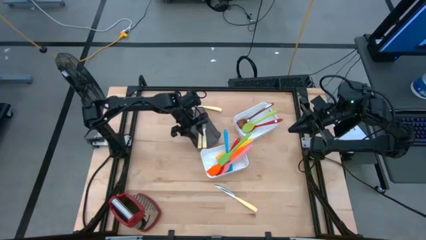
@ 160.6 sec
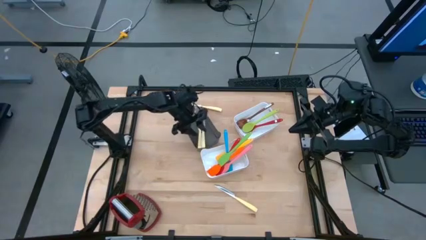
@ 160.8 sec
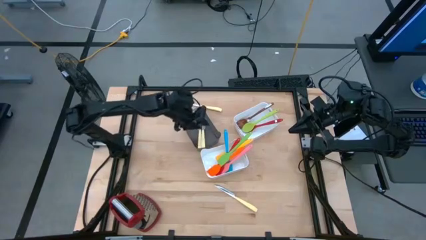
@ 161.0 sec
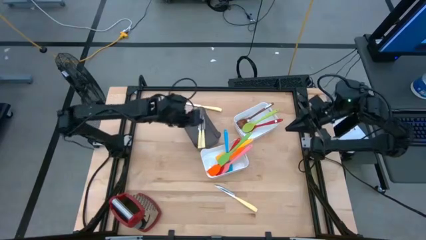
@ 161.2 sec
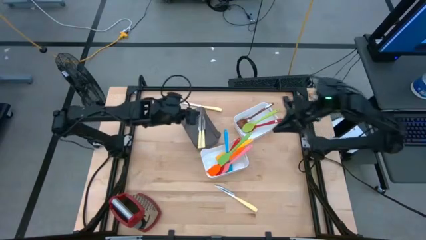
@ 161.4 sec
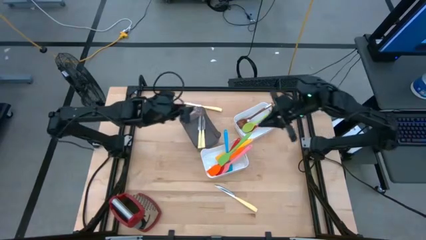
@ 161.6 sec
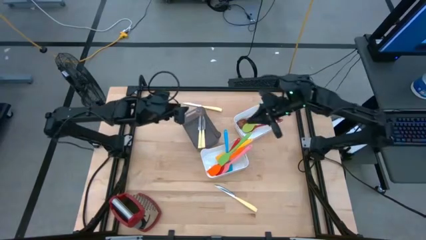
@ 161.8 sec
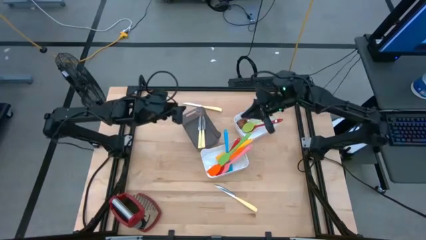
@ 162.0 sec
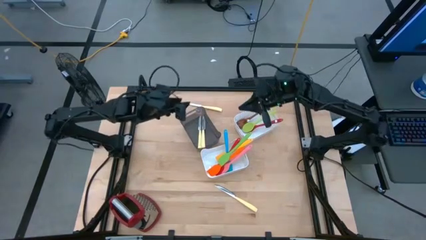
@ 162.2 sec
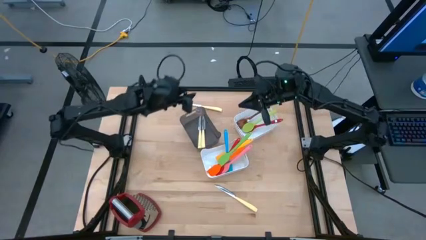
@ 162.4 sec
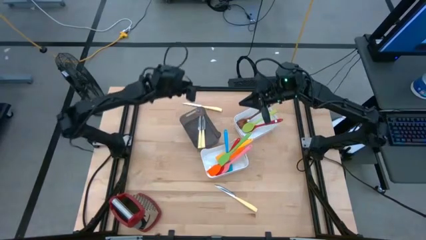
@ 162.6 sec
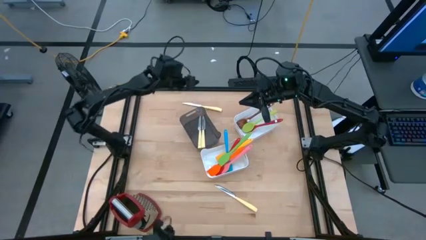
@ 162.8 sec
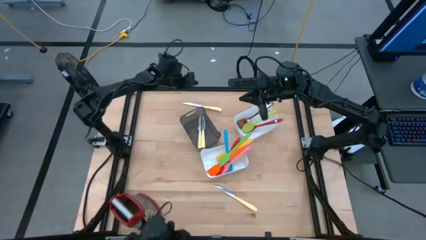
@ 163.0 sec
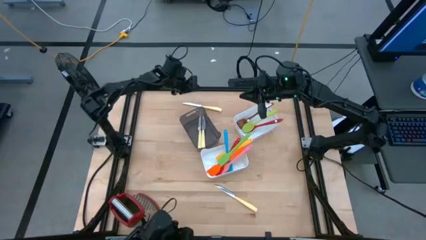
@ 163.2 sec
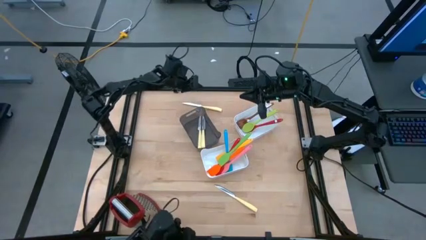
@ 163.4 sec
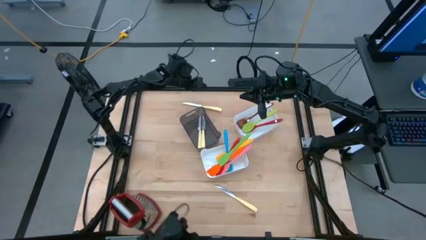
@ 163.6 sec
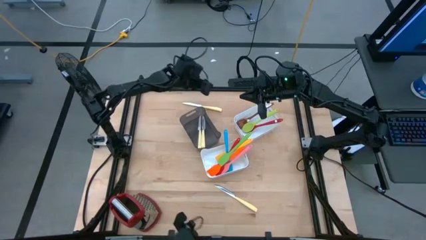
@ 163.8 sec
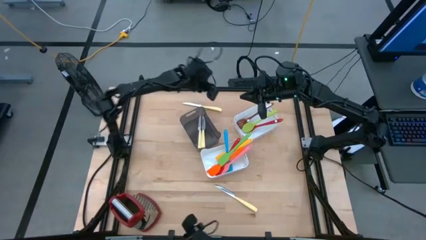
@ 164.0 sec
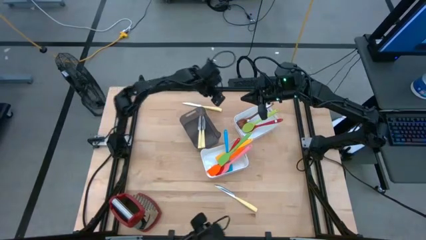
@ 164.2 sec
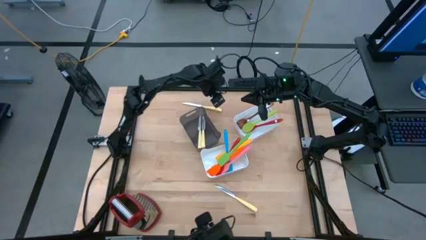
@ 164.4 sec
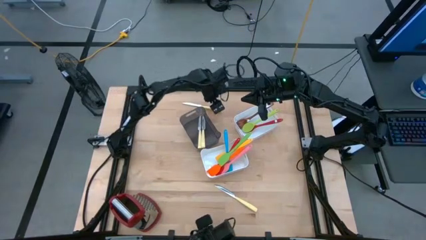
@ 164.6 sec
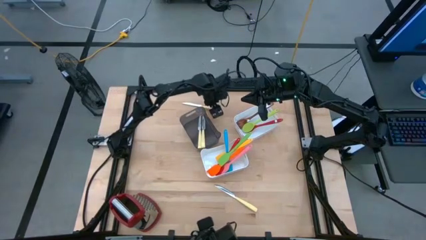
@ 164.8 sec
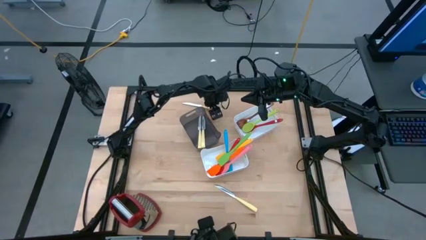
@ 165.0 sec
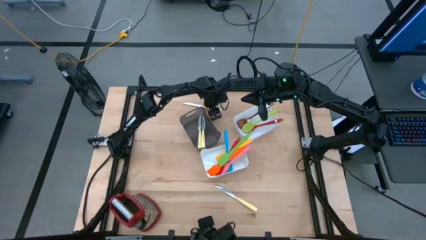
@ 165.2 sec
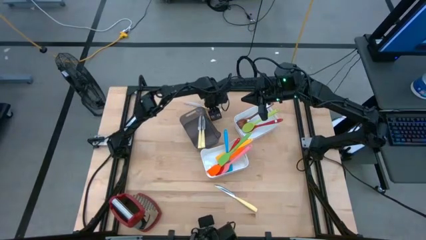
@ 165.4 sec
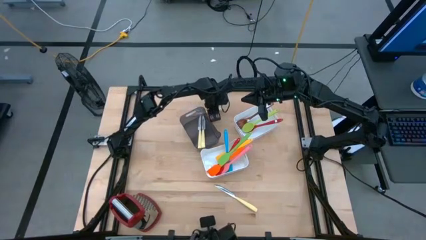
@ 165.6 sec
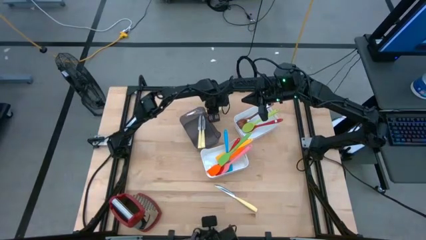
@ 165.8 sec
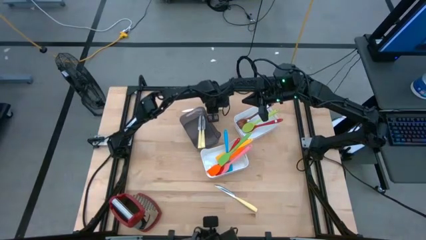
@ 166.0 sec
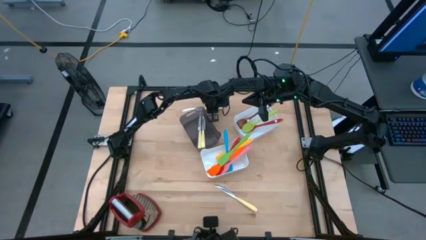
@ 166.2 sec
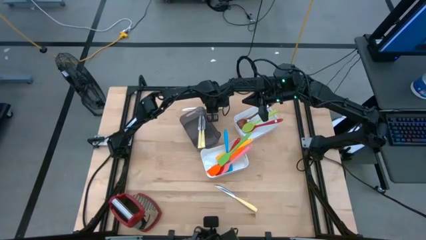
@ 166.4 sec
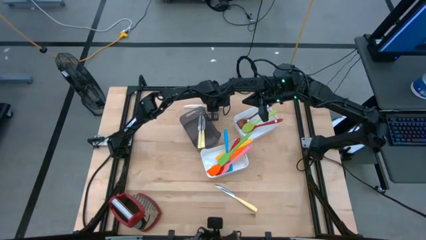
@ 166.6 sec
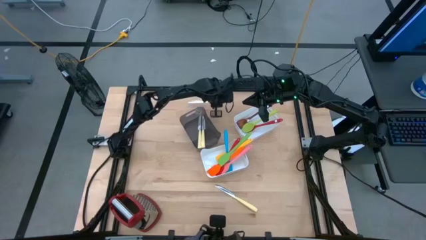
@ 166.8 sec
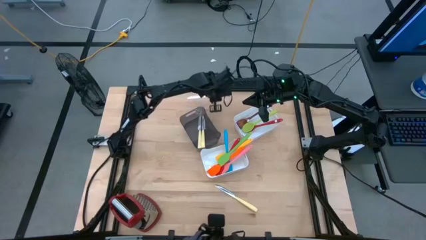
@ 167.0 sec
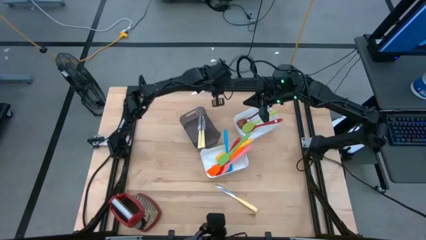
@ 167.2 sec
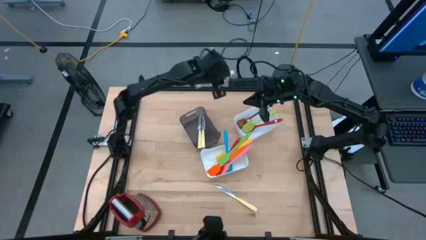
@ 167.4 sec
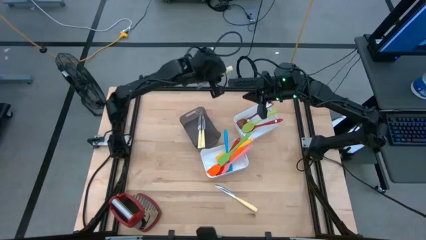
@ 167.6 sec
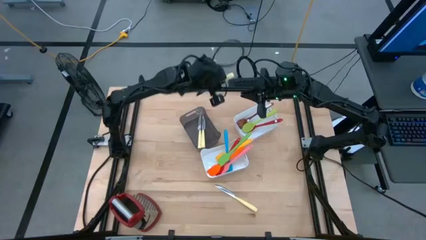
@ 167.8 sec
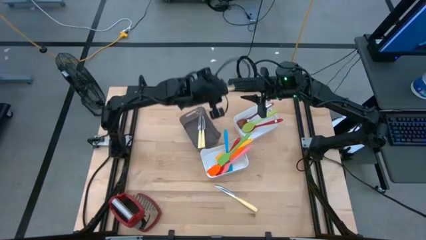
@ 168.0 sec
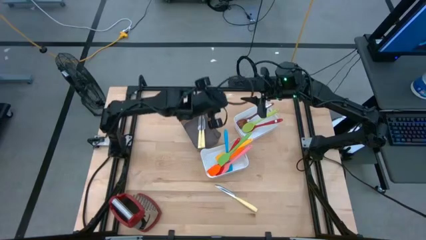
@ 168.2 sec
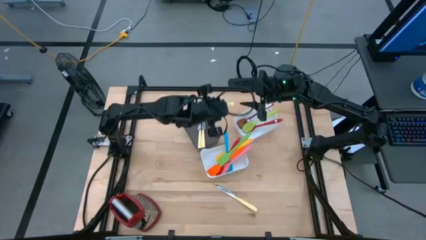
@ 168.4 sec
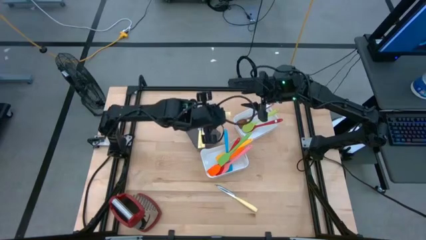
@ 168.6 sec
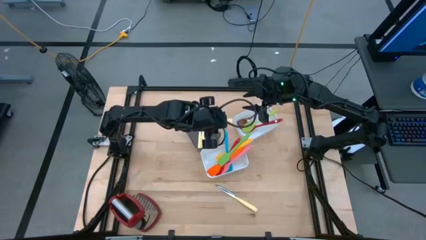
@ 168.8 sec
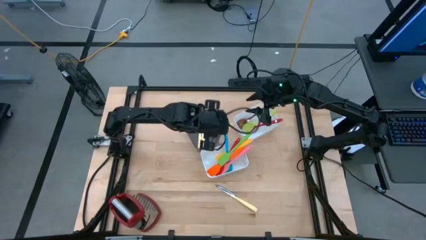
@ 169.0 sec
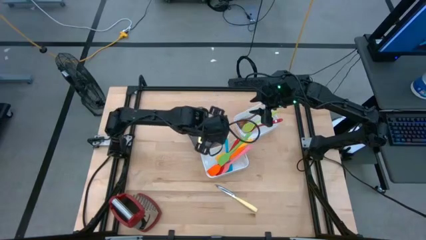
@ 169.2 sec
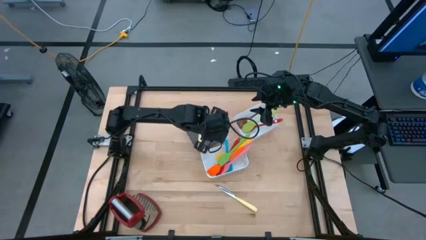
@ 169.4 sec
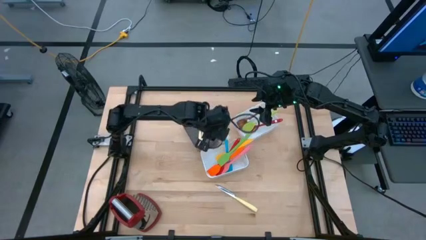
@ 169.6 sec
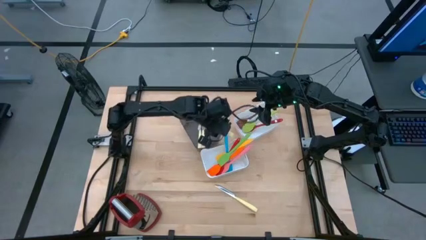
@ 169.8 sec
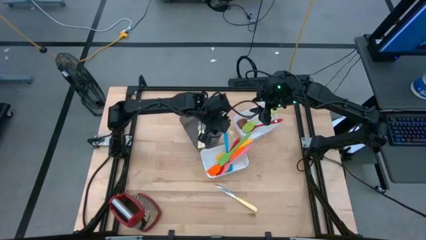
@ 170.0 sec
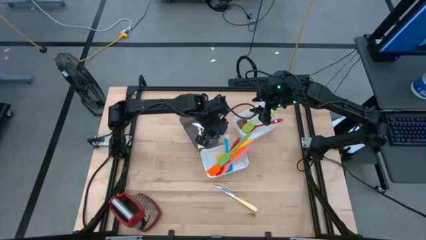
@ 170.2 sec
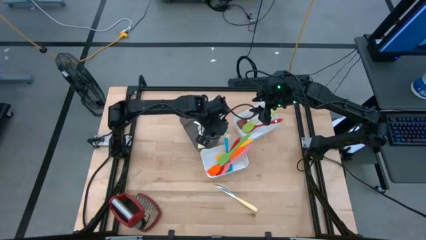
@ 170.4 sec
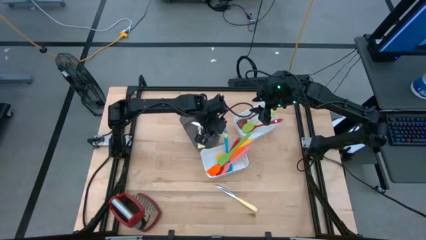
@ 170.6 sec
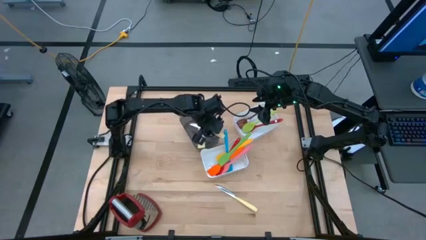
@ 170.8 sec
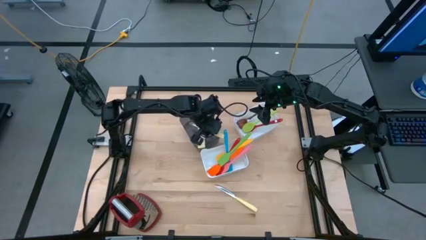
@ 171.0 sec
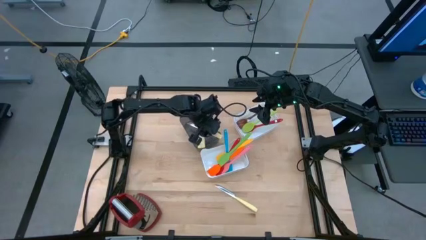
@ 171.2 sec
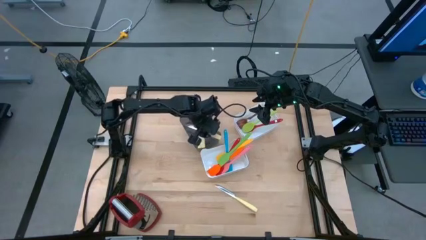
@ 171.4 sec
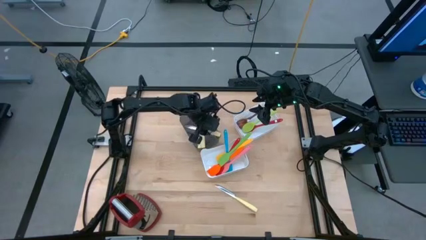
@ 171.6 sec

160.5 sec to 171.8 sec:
Task: Pick & Place Kitchen Items
Put the white table knife into the black bin

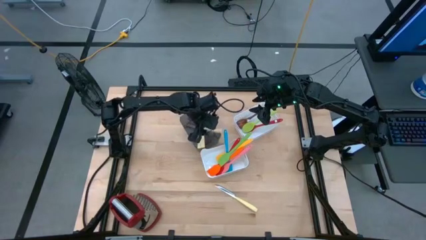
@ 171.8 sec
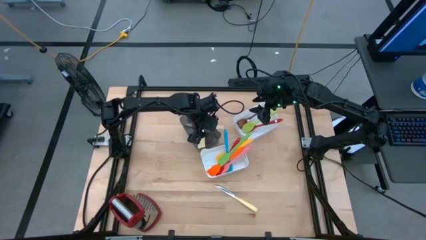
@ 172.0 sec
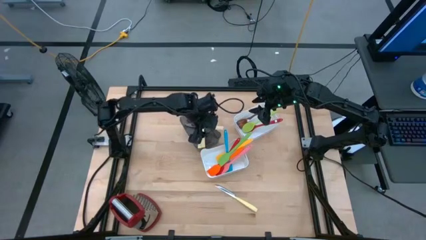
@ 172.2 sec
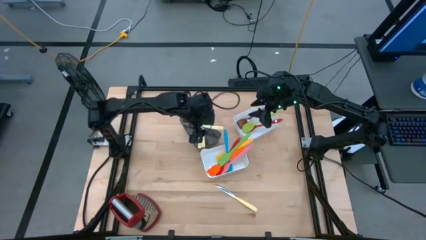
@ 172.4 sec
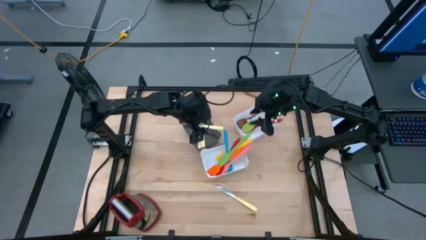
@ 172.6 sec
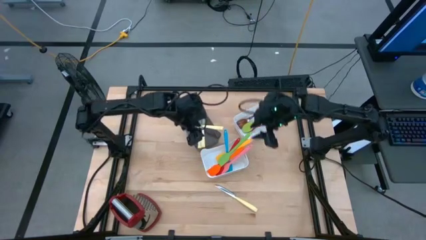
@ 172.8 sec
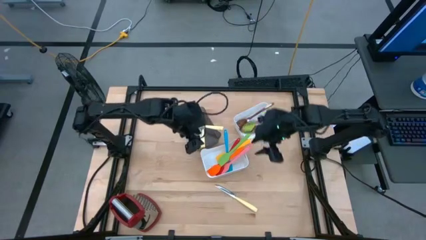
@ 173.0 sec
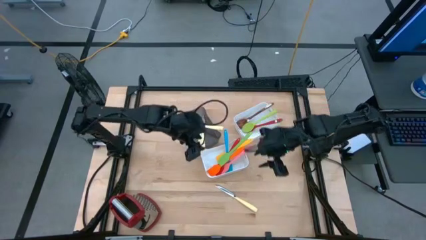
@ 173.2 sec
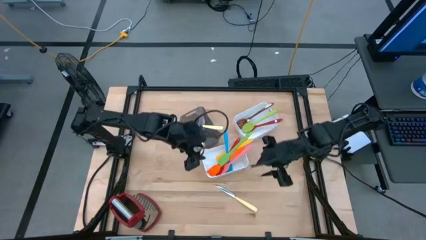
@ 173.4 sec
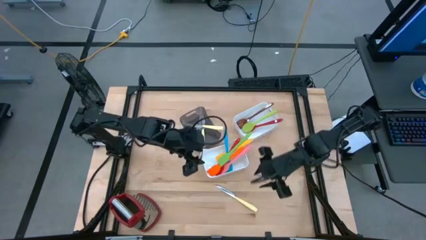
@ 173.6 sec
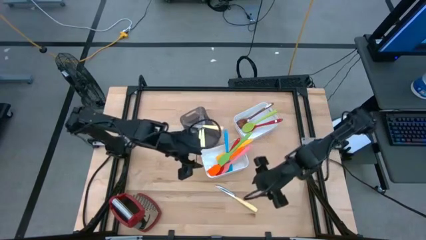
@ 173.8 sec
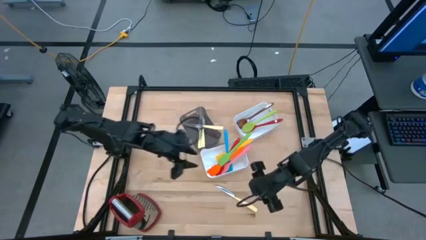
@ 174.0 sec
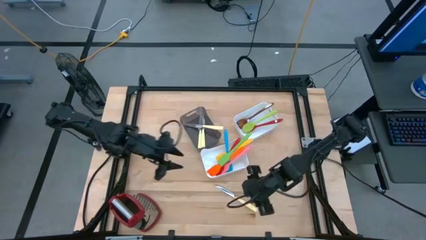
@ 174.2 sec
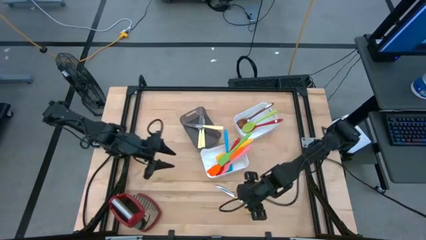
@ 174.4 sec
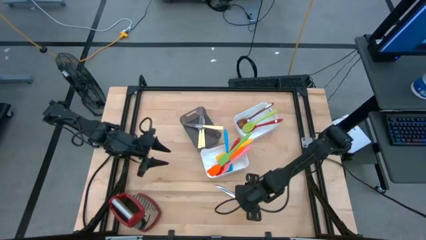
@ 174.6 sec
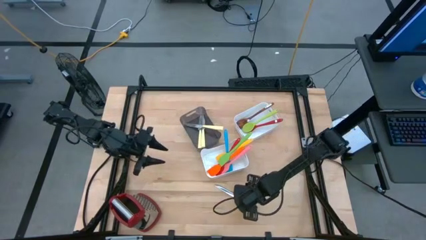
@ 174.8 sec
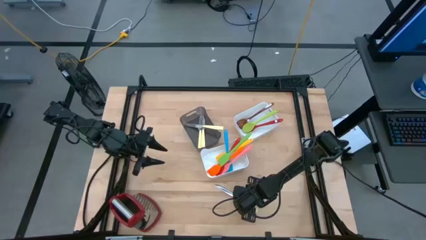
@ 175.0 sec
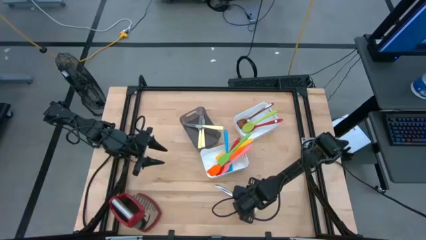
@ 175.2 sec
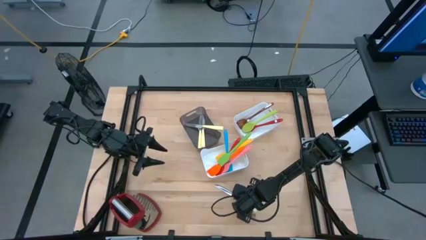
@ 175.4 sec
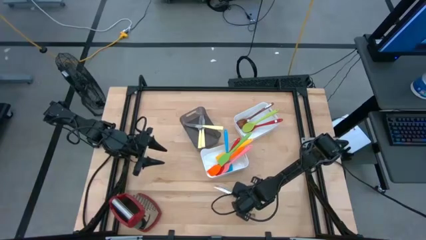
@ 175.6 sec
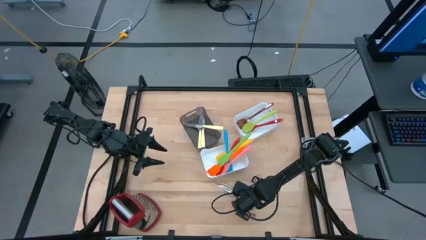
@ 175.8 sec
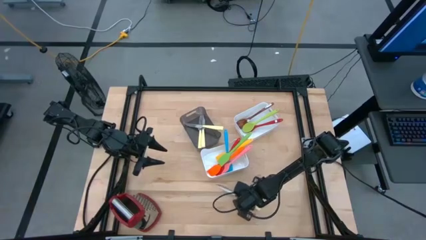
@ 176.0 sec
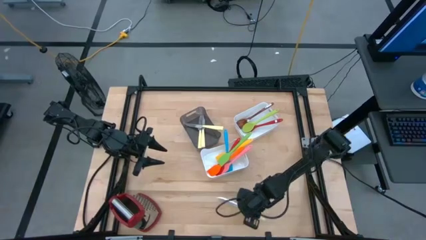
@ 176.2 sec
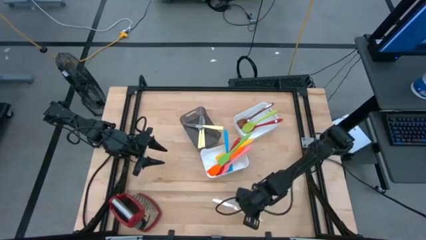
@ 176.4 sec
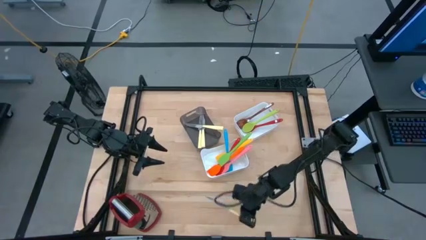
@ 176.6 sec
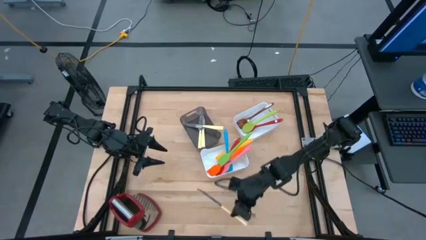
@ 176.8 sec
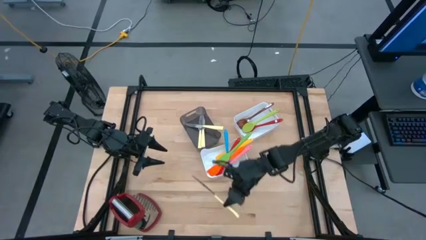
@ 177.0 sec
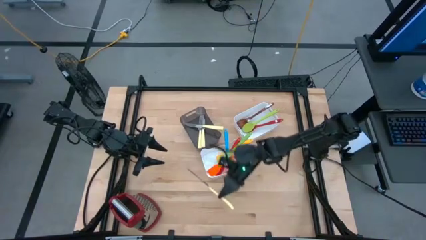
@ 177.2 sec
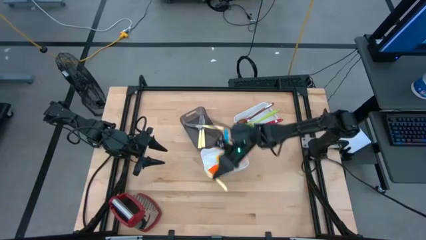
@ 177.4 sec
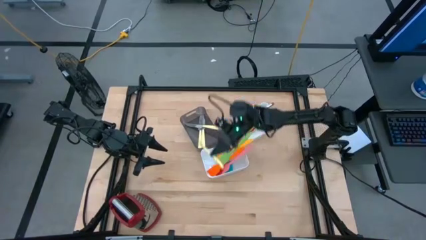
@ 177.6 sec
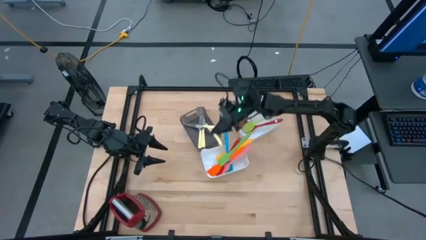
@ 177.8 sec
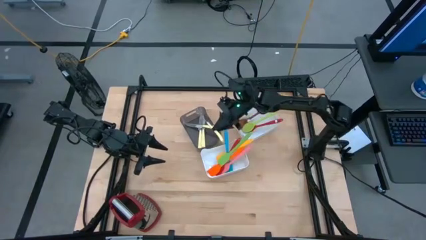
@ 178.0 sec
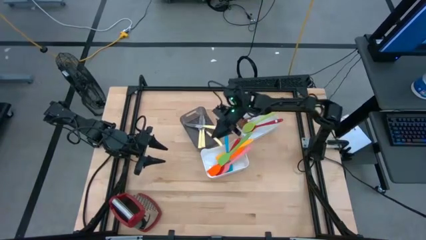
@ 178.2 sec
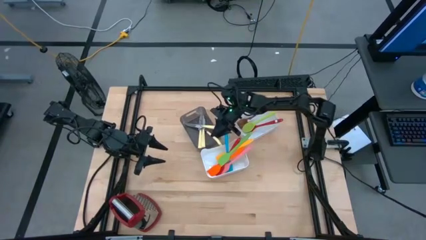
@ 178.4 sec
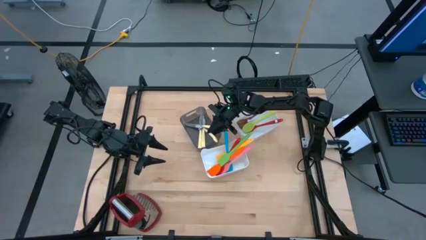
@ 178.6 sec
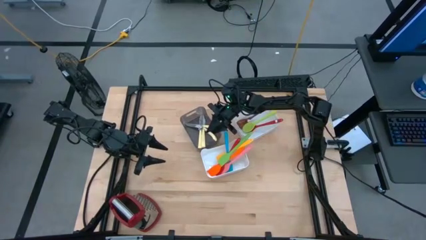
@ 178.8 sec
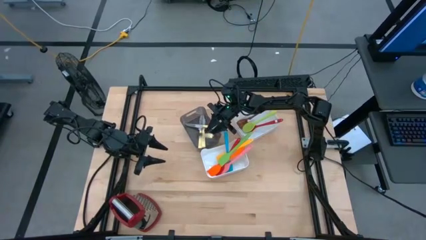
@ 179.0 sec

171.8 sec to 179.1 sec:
Put the white table knife into the black bin
